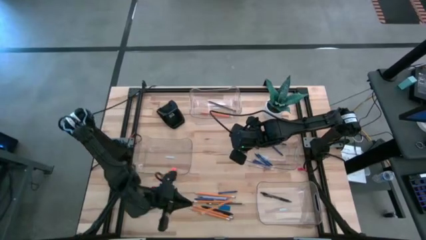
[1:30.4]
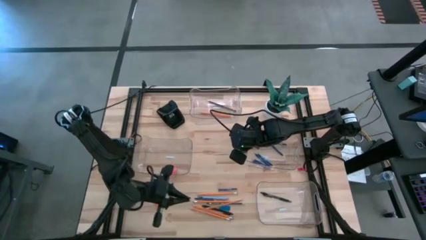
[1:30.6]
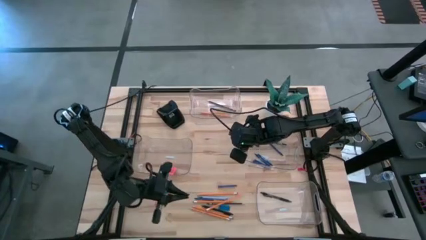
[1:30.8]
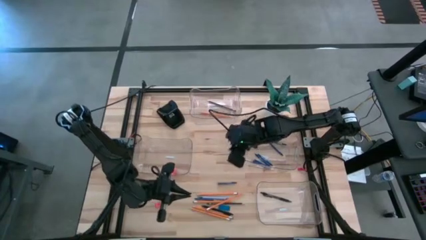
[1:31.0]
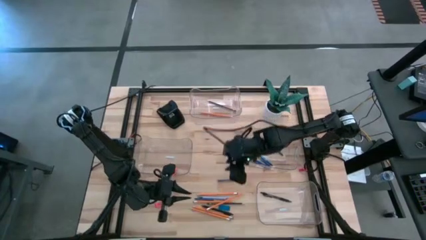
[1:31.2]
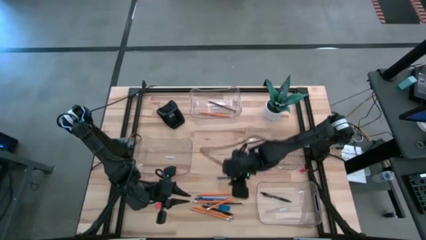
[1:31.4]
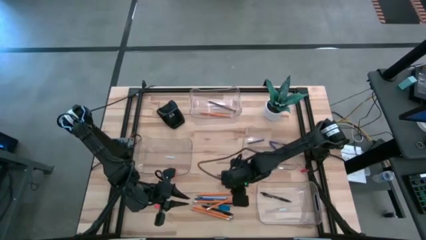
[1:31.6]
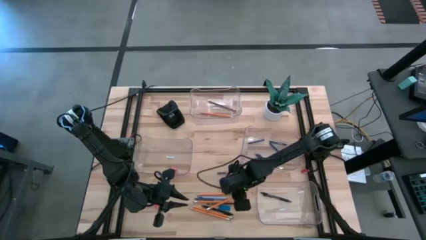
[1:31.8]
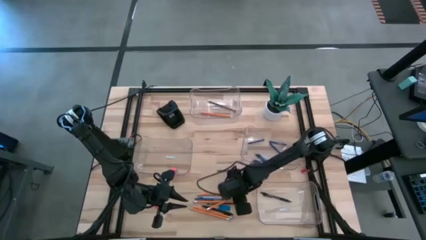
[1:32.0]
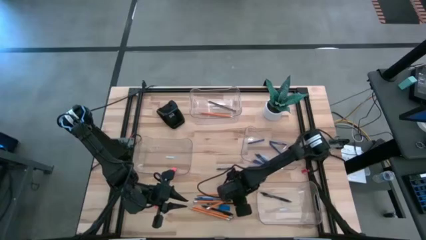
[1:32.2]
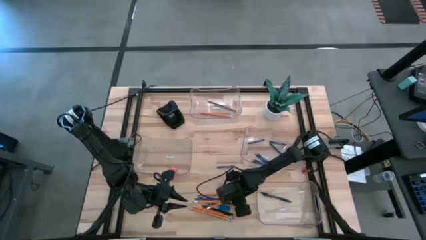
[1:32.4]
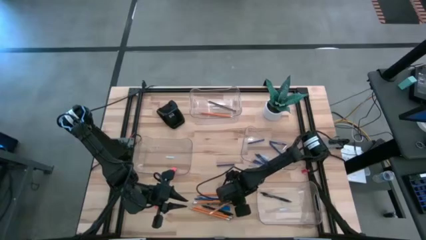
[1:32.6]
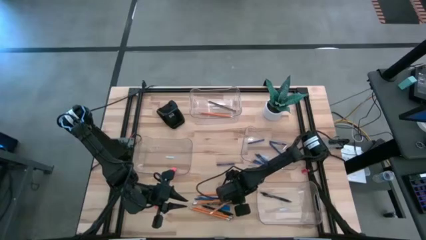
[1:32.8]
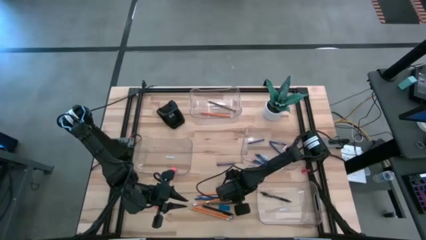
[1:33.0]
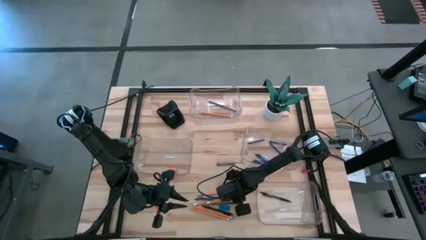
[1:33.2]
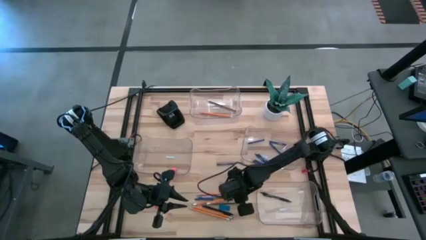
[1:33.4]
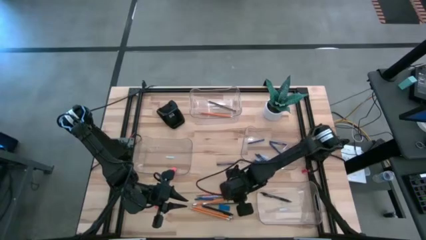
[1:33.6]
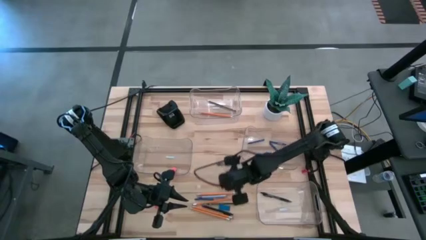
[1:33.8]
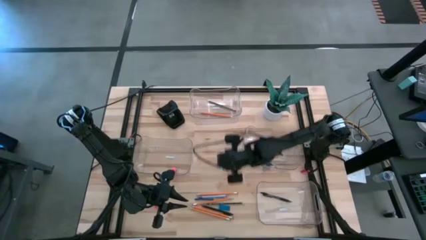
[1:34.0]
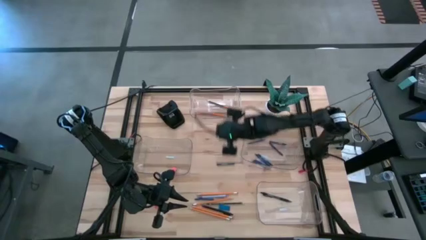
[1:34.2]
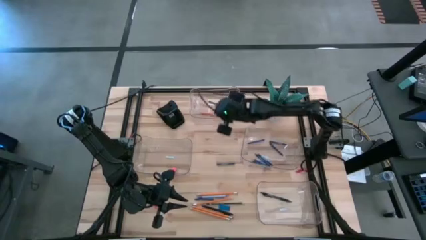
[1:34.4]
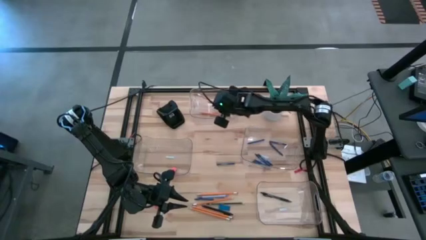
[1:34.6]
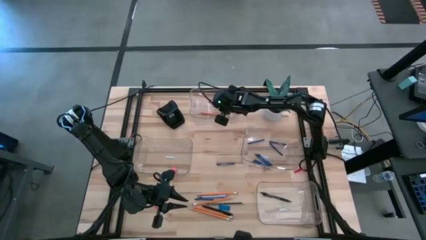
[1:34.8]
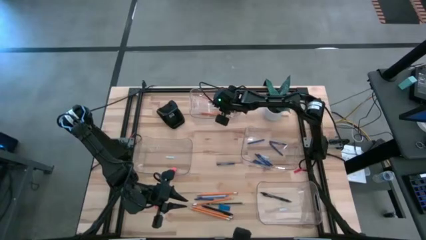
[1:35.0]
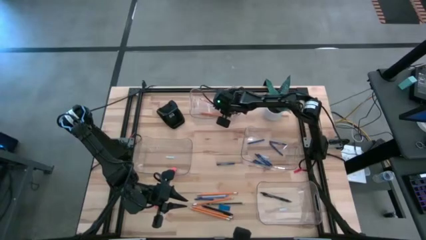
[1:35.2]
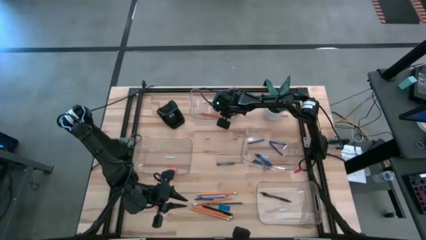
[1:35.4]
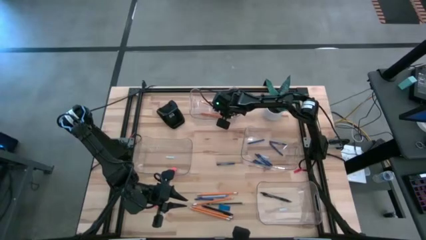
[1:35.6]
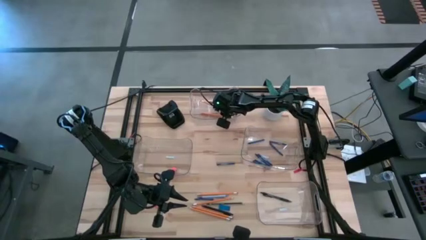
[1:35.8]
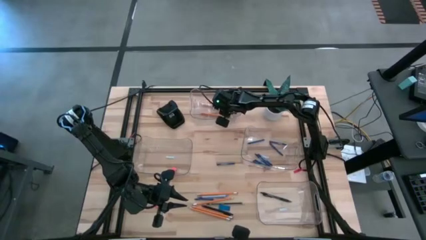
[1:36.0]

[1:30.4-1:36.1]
Task: Sort crayons/erasers/pens/pencils in bins
Put the yellow pencil into the top transparent bin

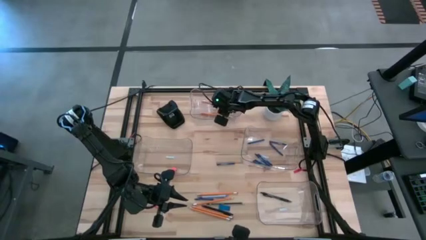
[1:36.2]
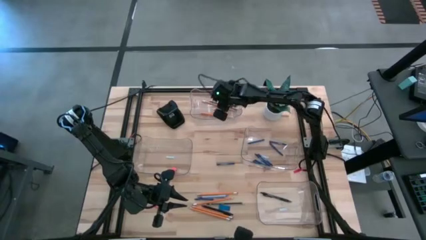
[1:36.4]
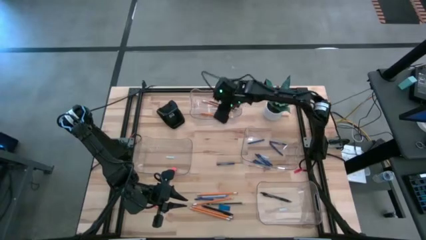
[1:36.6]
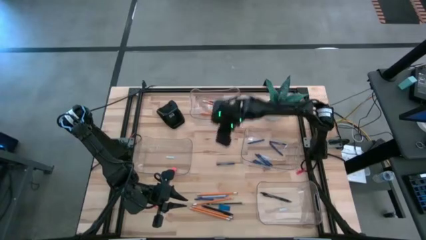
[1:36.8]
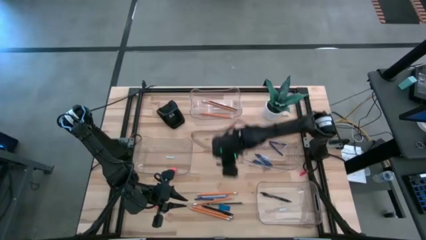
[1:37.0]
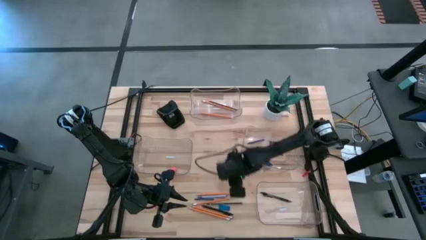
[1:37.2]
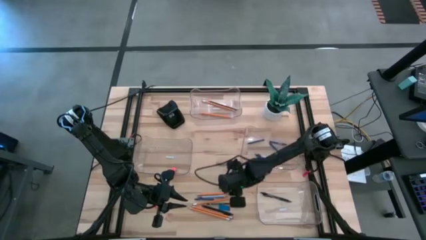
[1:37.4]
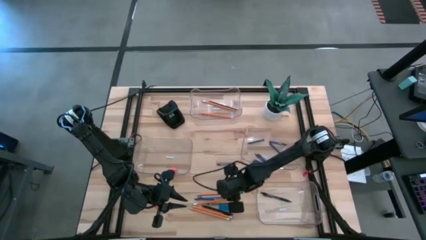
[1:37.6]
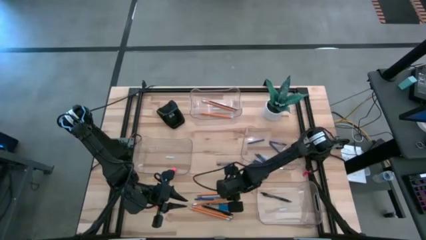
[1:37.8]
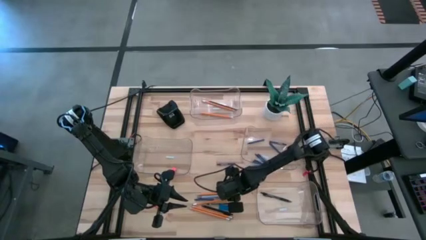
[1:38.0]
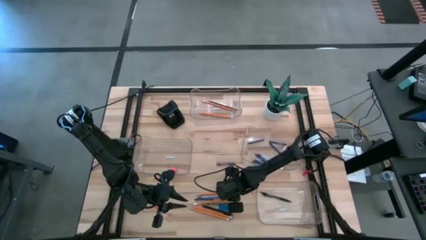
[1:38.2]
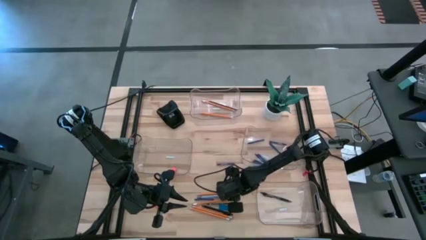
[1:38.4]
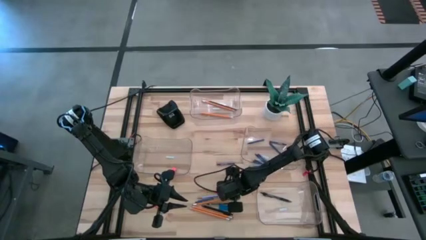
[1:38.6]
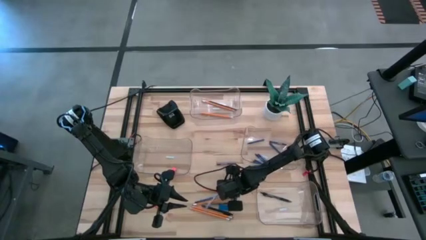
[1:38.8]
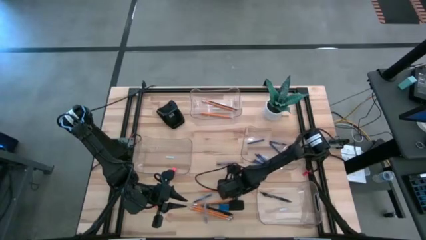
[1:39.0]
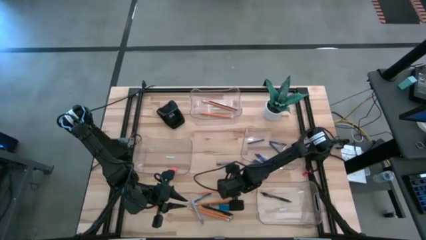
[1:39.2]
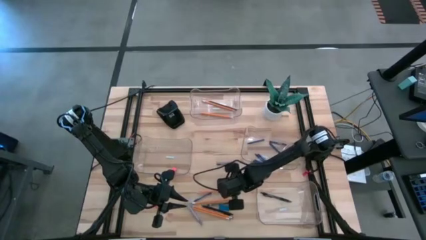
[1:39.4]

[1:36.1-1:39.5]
Put the yellow pencil into the top transparent bin

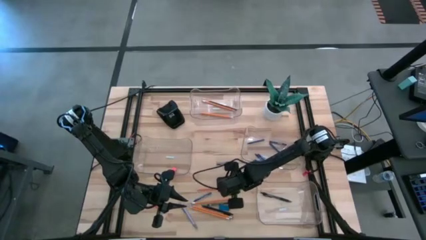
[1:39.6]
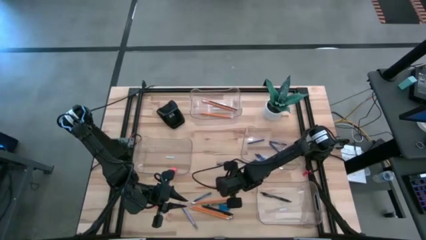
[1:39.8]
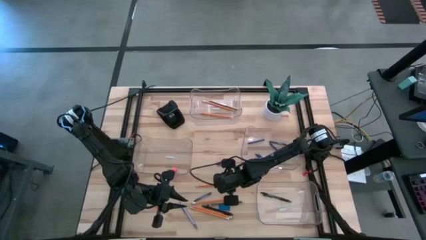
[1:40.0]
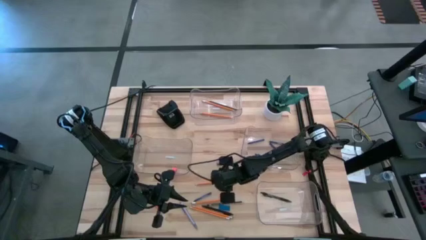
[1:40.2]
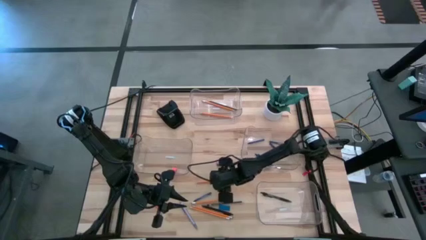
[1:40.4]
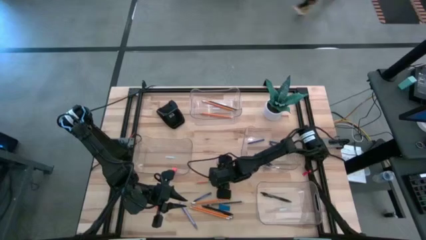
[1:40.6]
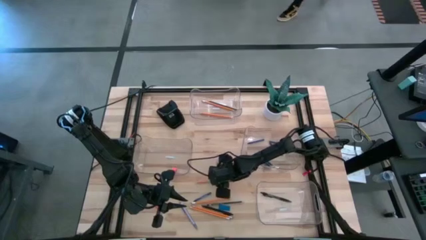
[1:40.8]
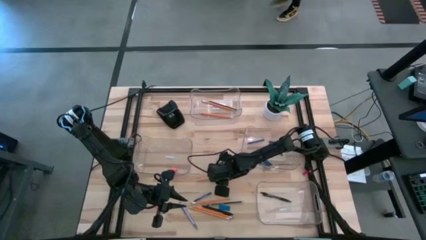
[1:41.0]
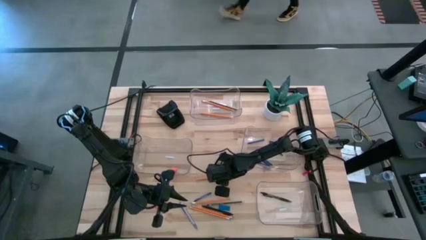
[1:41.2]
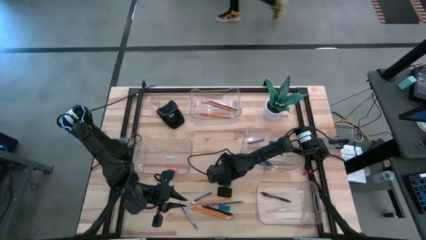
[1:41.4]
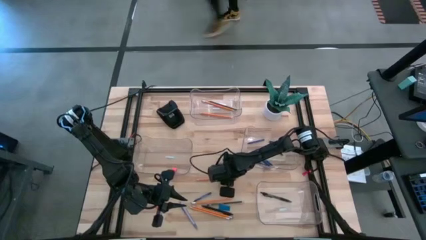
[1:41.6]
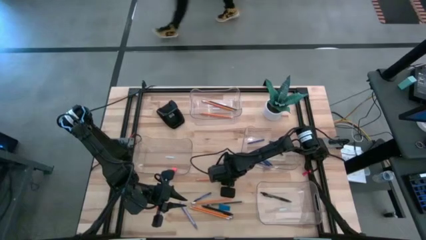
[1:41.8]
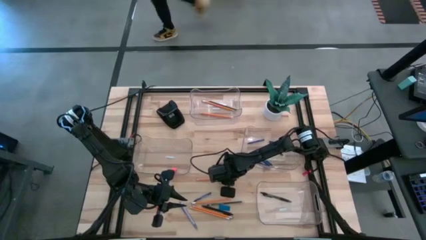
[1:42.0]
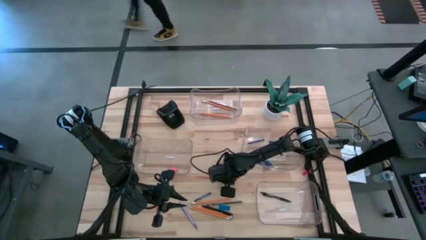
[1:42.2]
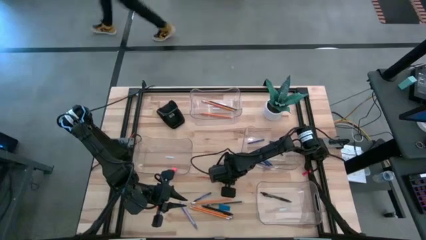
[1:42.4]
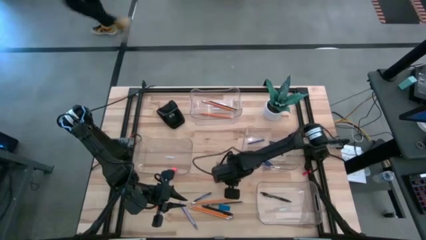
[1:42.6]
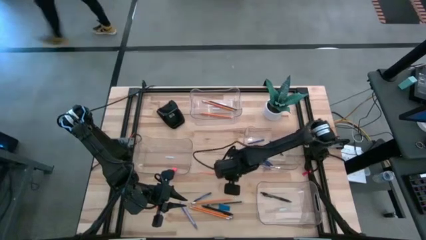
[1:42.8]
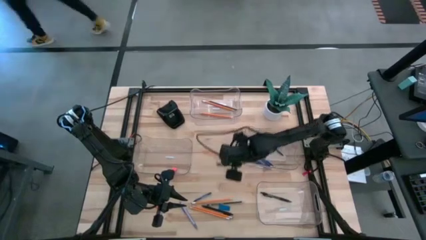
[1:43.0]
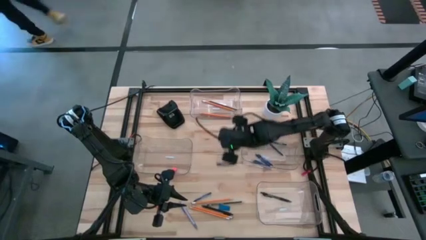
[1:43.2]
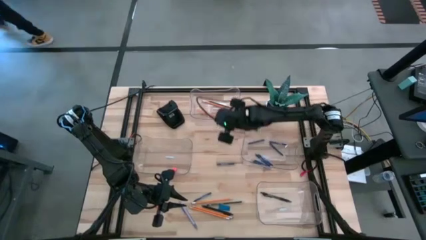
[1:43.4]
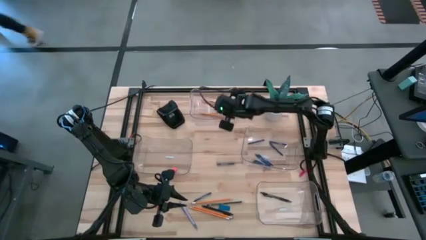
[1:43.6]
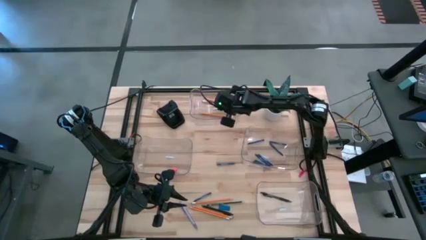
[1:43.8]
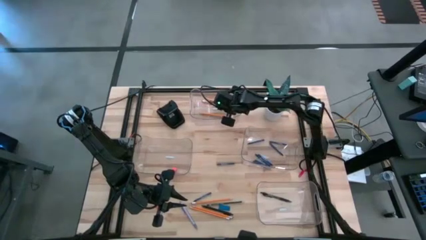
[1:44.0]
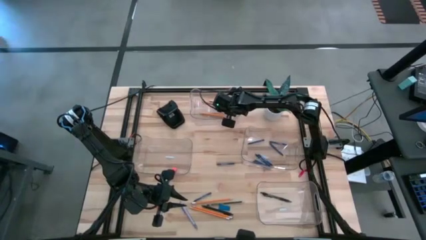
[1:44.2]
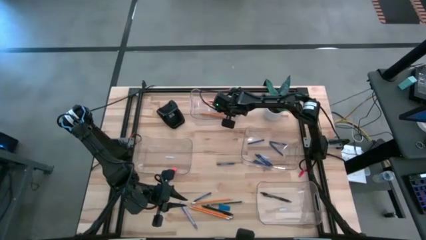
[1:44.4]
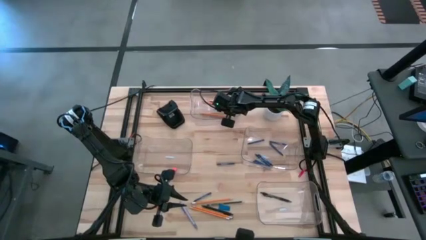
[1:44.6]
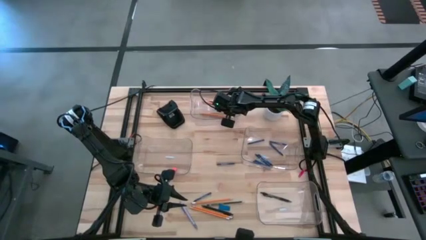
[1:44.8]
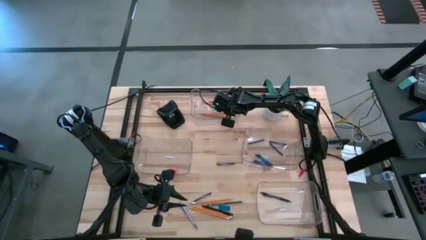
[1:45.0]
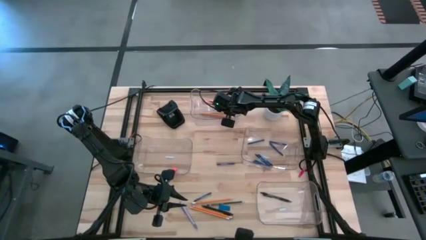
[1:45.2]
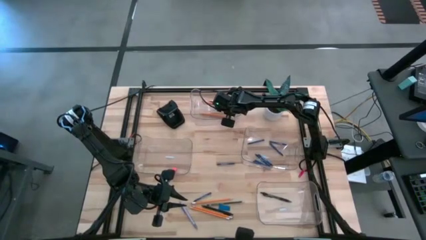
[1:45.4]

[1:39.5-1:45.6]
Put the yellow pencil into the top transparent bin

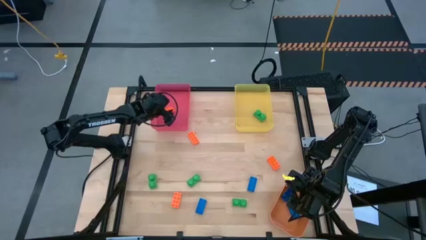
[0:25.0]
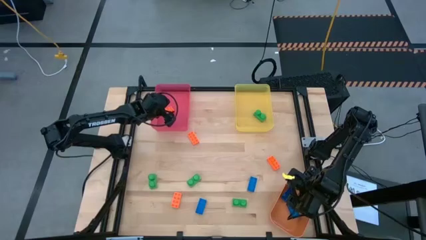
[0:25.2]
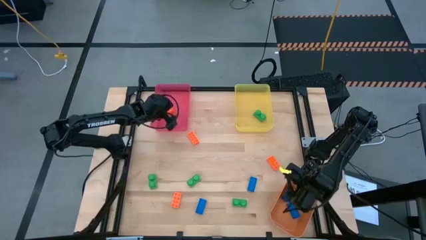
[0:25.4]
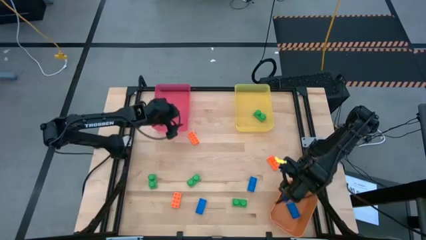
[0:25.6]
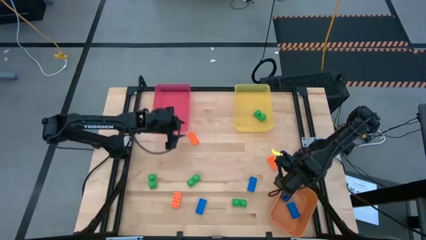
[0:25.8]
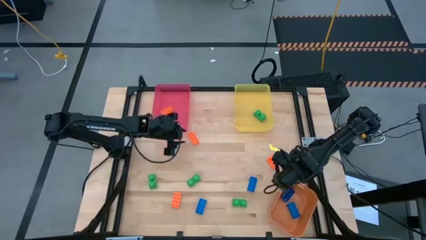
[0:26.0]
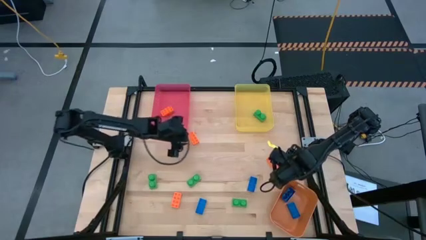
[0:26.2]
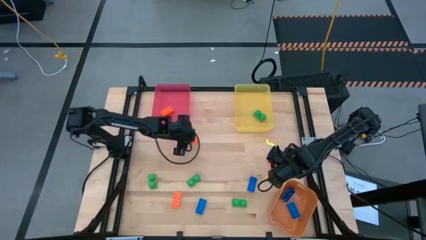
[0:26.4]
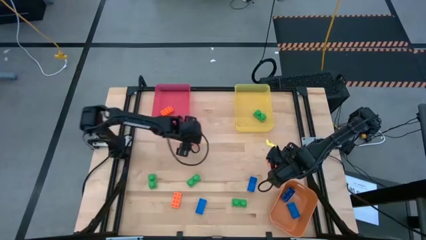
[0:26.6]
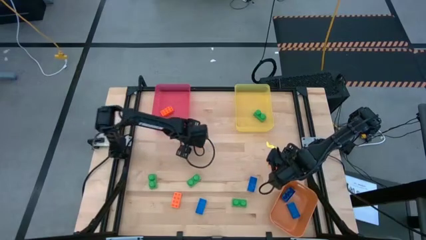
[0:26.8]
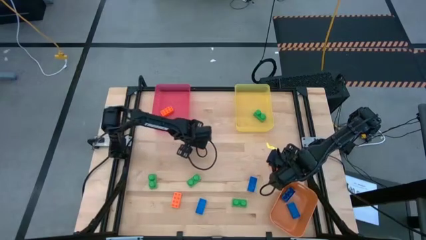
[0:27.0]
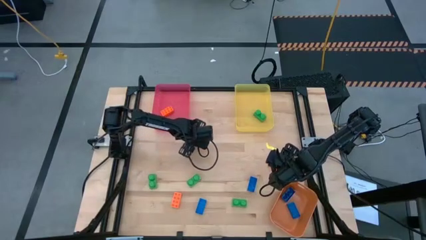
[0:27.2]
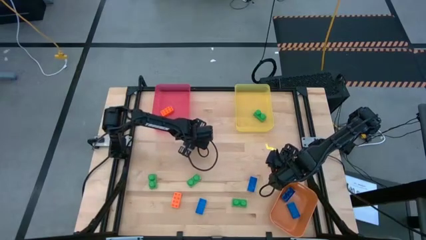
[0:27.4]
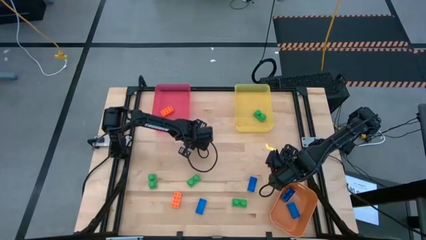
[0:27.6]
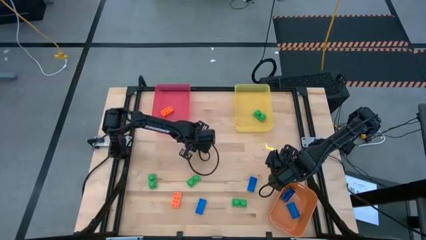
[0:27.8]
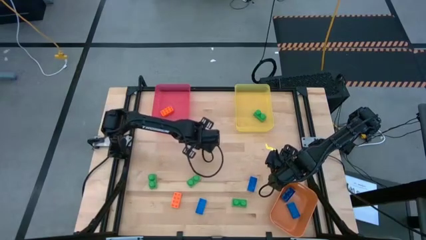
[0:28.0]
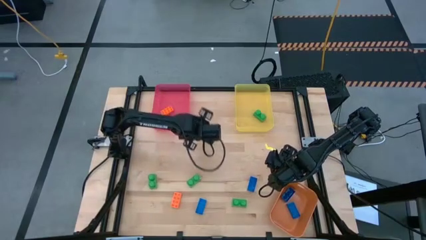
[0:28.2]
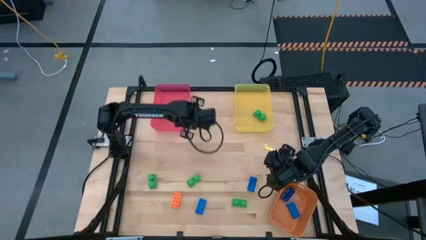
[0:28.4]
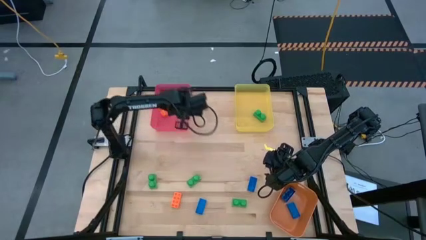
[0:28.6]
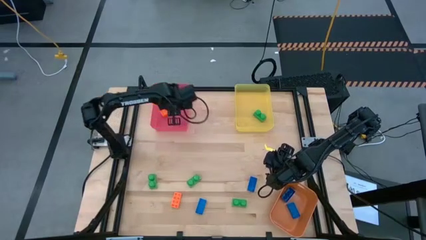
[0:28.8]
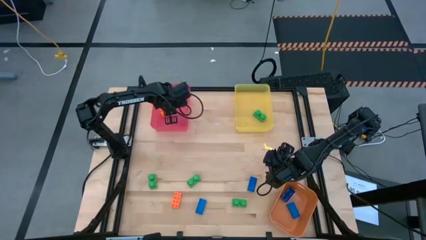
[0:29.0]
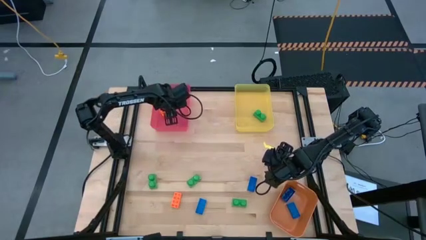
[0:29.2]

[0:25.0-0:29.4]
Task: Sort & place blocks by color
Put the top left orange game piece into the red bin
